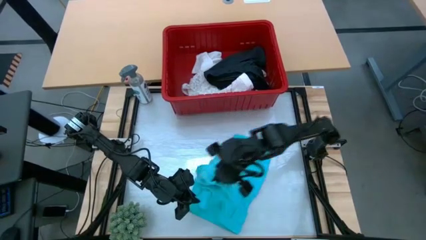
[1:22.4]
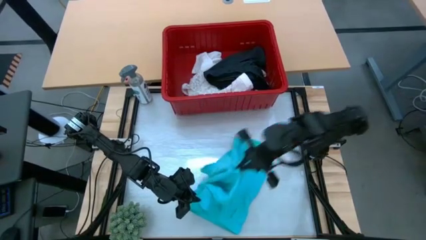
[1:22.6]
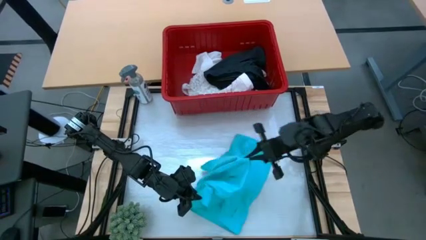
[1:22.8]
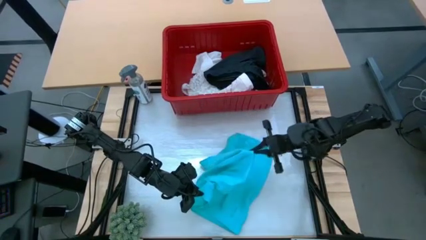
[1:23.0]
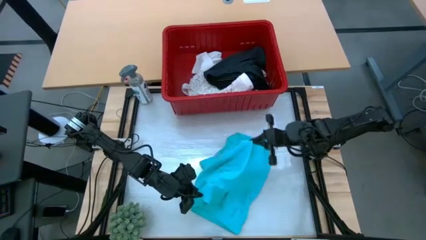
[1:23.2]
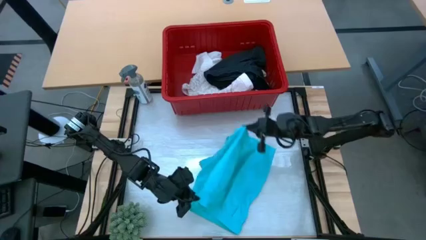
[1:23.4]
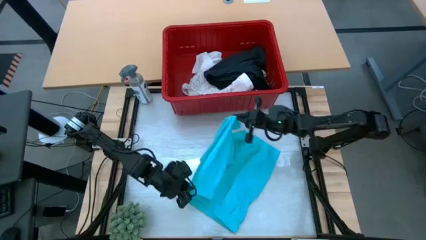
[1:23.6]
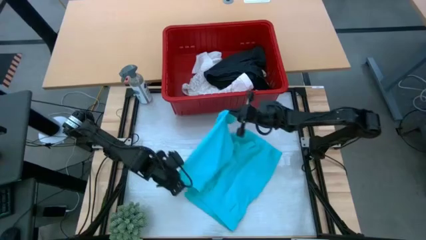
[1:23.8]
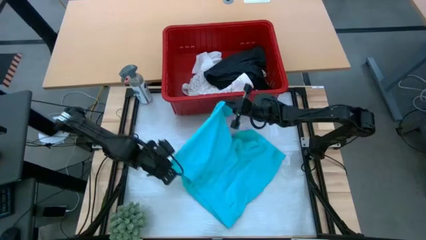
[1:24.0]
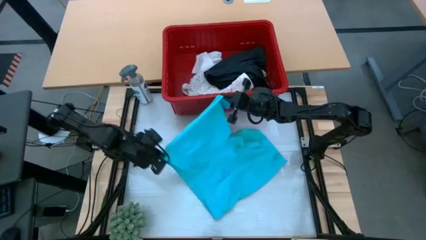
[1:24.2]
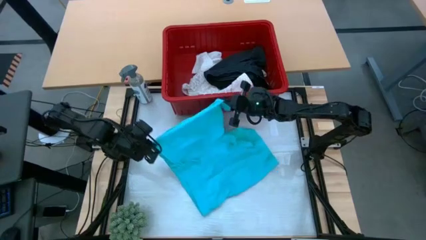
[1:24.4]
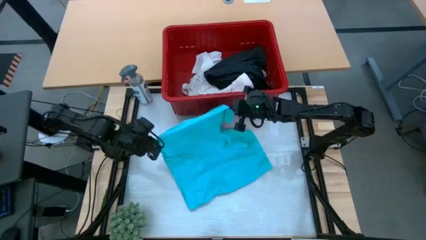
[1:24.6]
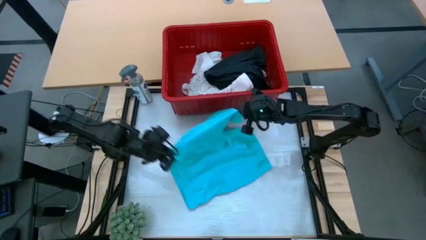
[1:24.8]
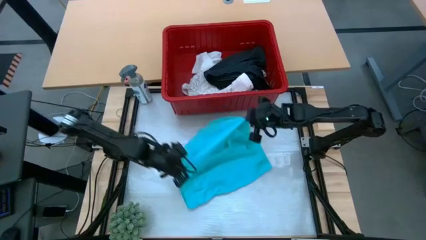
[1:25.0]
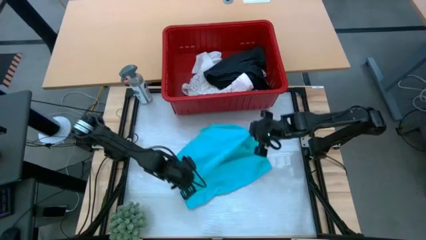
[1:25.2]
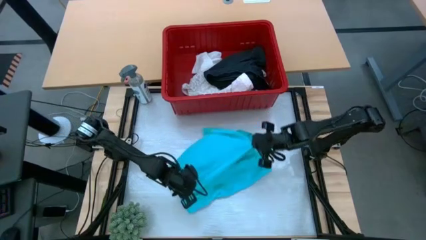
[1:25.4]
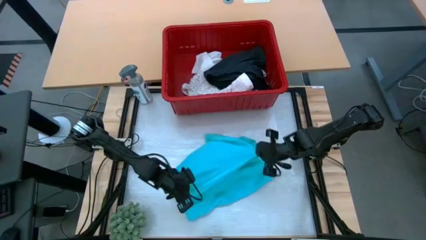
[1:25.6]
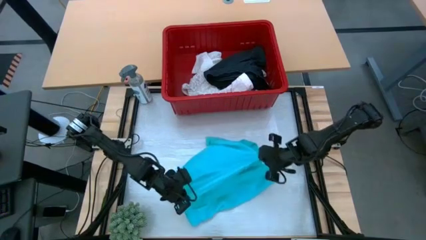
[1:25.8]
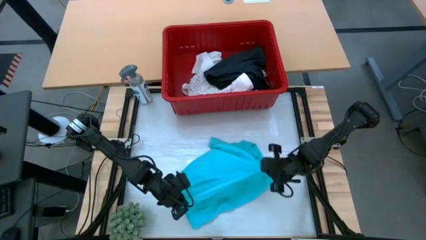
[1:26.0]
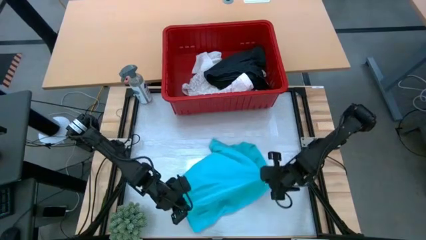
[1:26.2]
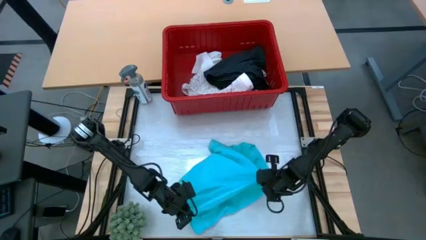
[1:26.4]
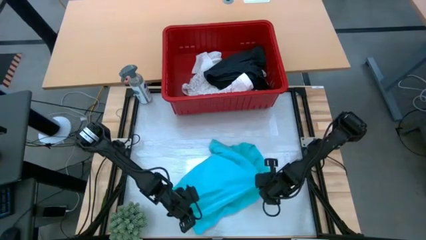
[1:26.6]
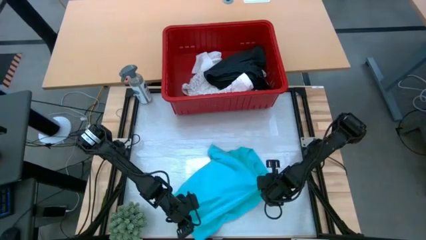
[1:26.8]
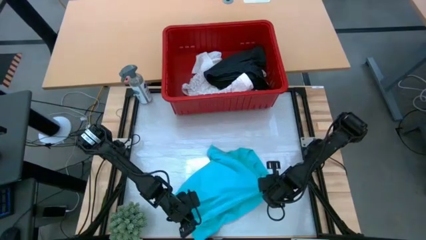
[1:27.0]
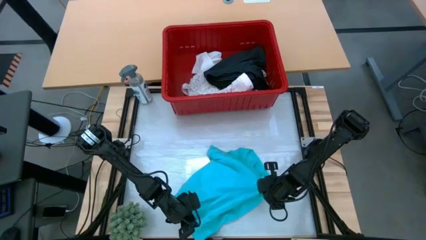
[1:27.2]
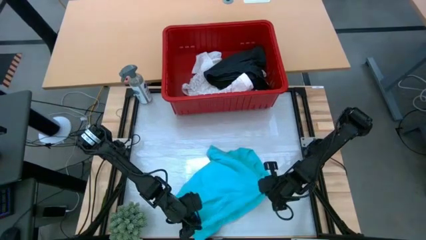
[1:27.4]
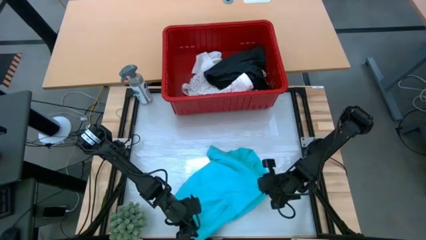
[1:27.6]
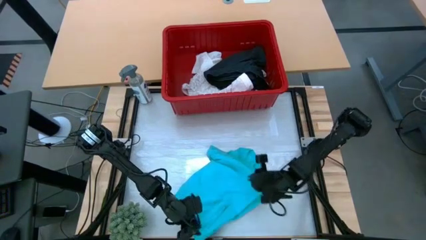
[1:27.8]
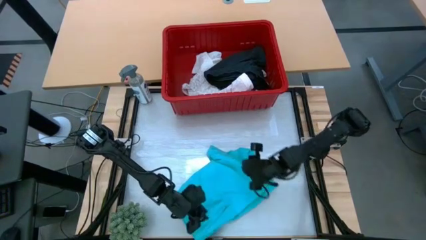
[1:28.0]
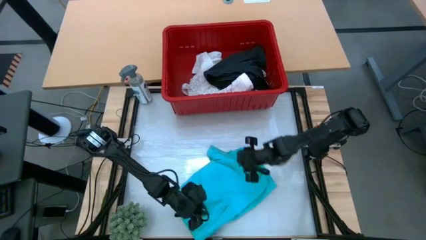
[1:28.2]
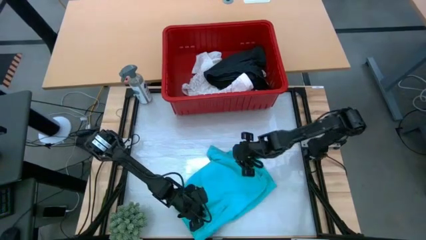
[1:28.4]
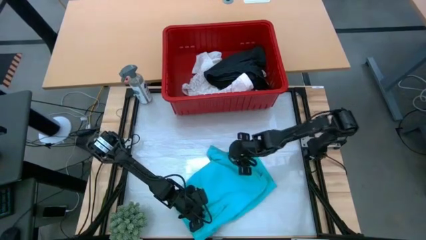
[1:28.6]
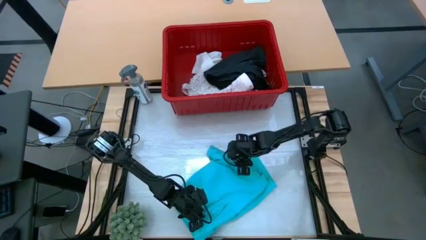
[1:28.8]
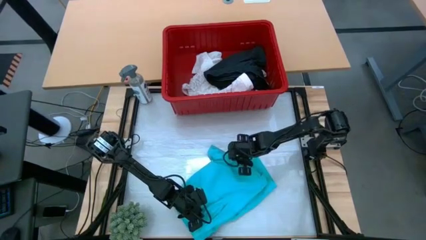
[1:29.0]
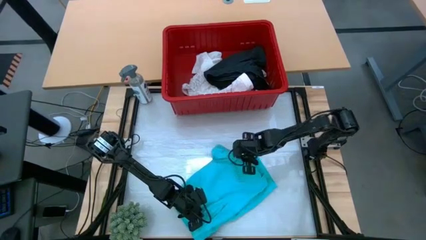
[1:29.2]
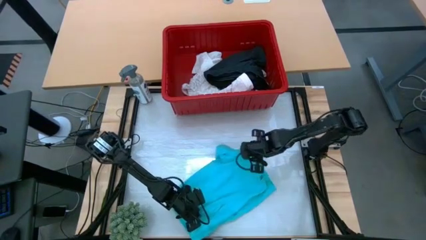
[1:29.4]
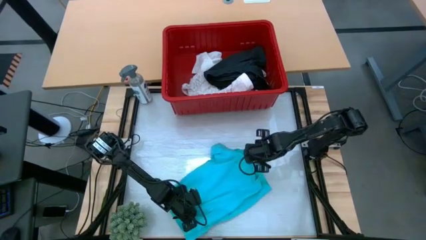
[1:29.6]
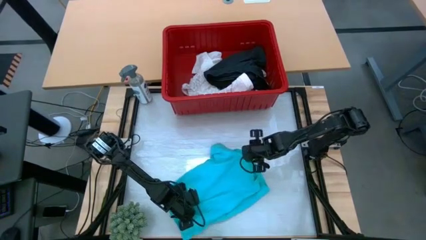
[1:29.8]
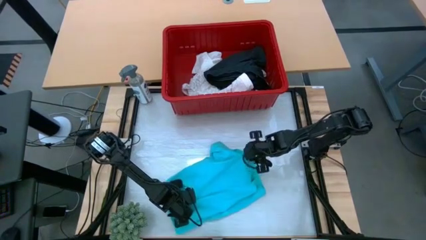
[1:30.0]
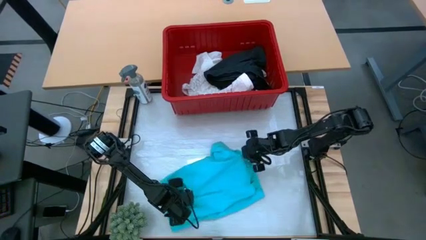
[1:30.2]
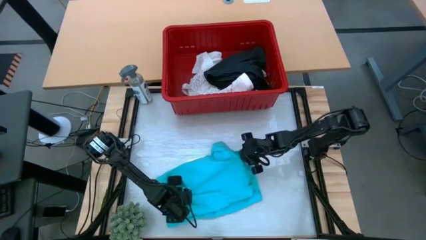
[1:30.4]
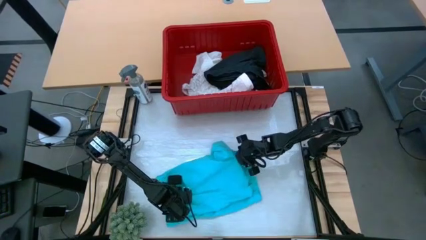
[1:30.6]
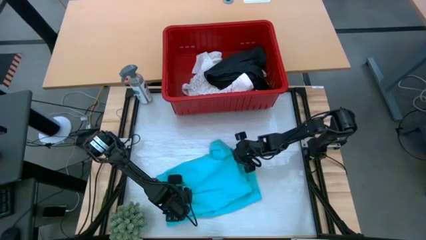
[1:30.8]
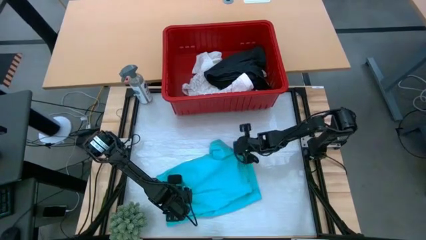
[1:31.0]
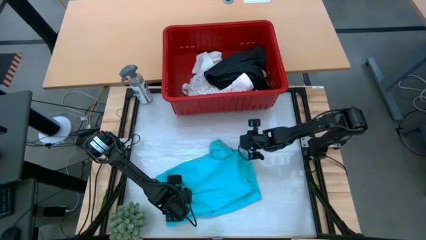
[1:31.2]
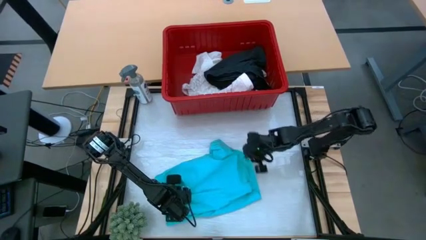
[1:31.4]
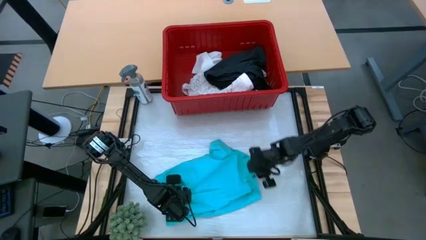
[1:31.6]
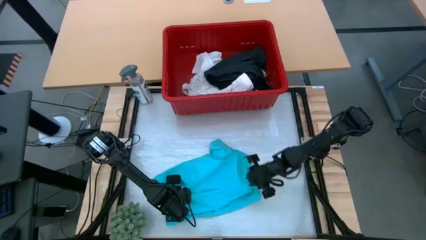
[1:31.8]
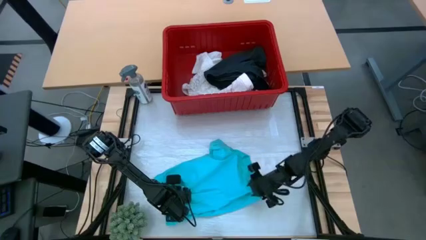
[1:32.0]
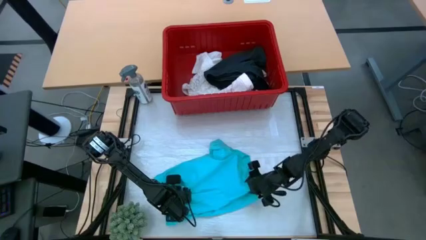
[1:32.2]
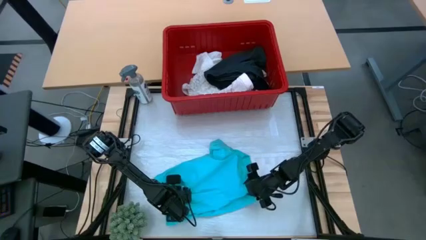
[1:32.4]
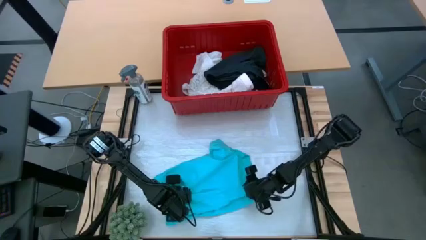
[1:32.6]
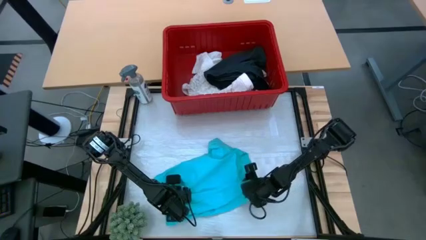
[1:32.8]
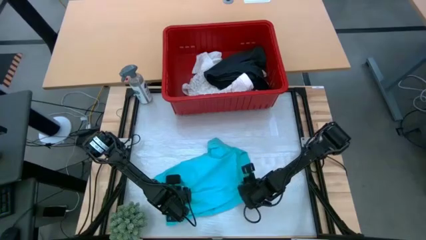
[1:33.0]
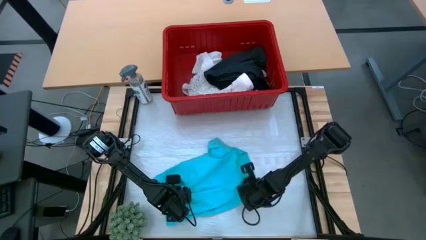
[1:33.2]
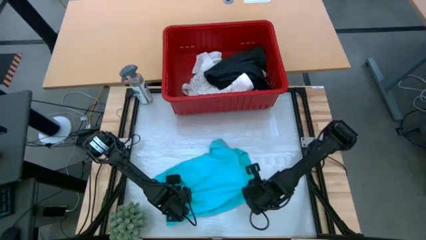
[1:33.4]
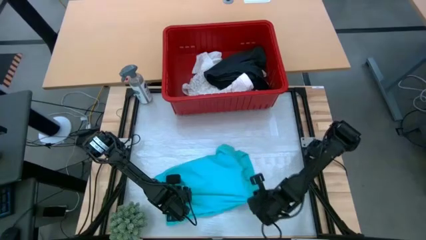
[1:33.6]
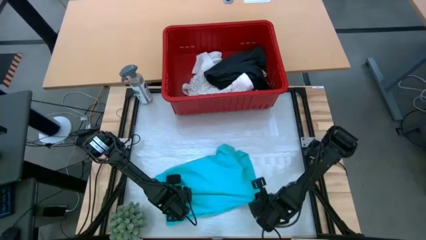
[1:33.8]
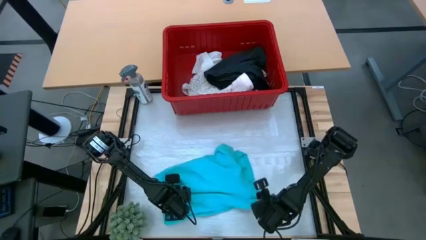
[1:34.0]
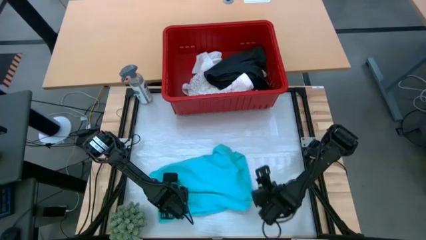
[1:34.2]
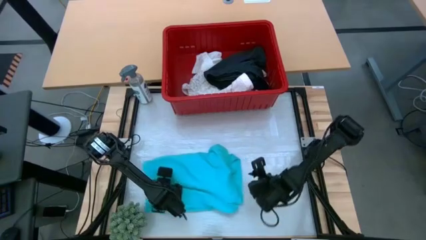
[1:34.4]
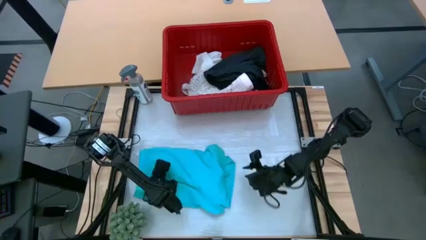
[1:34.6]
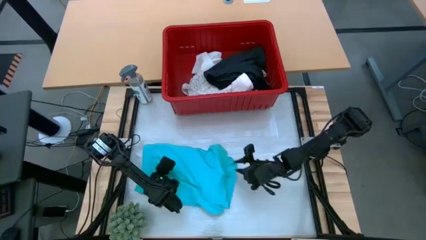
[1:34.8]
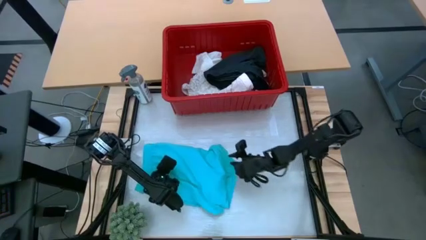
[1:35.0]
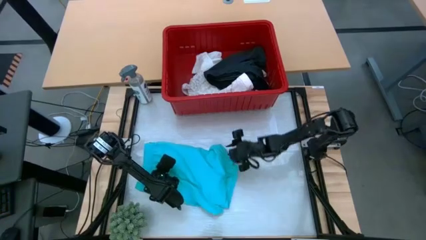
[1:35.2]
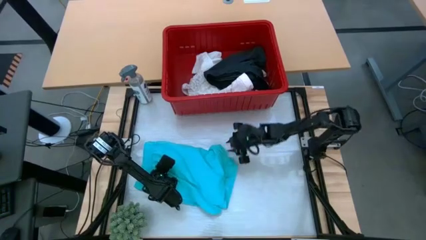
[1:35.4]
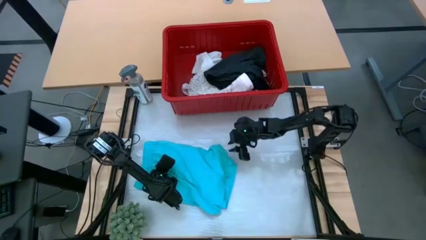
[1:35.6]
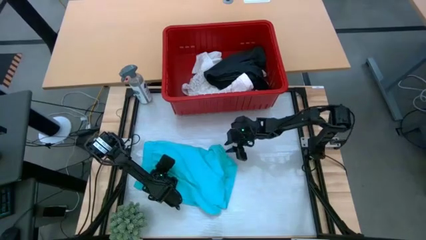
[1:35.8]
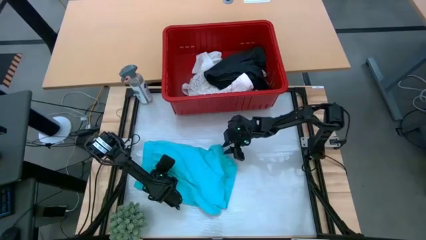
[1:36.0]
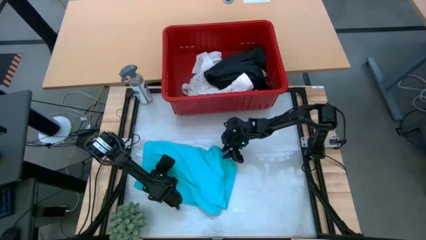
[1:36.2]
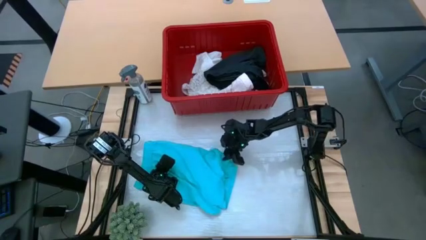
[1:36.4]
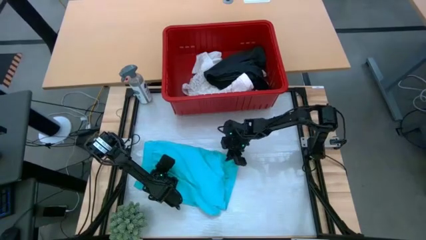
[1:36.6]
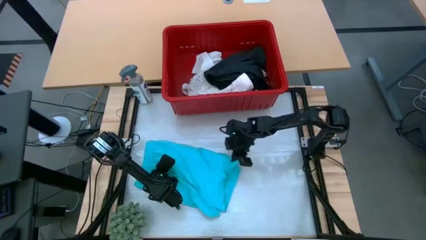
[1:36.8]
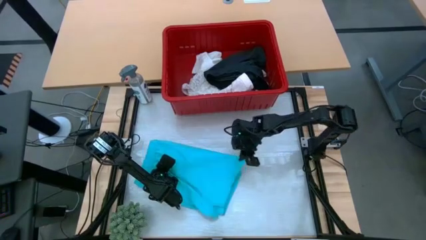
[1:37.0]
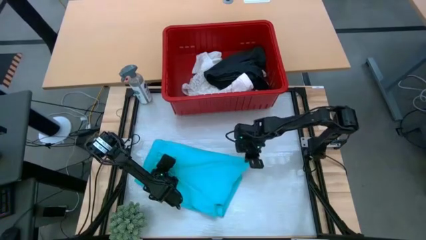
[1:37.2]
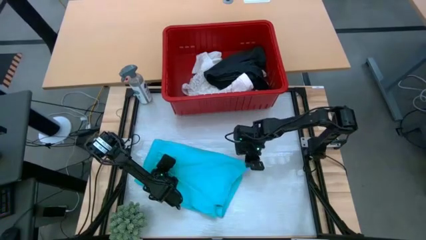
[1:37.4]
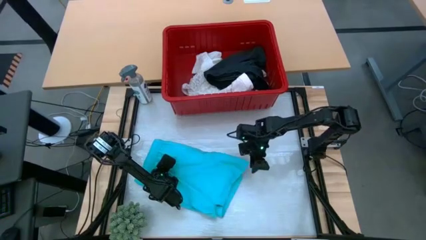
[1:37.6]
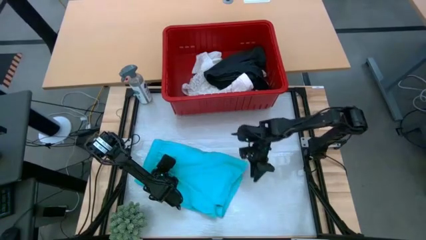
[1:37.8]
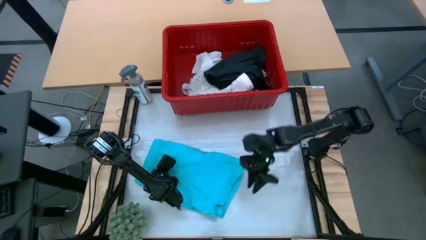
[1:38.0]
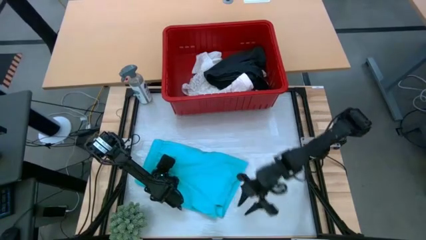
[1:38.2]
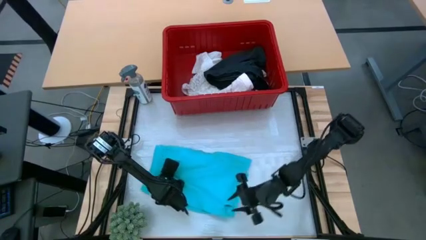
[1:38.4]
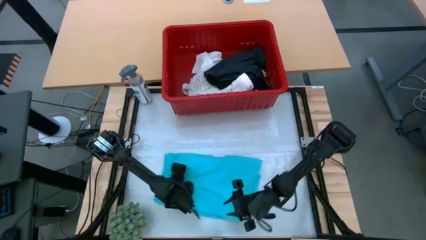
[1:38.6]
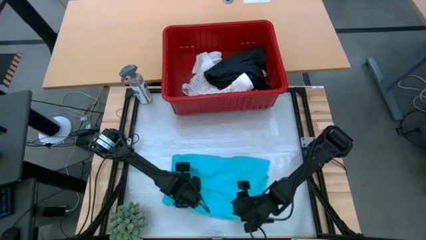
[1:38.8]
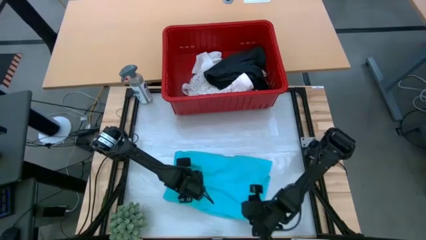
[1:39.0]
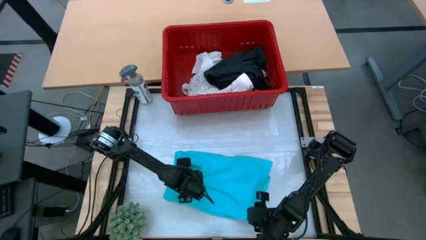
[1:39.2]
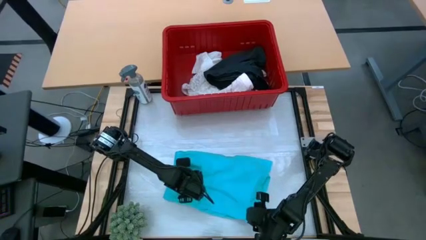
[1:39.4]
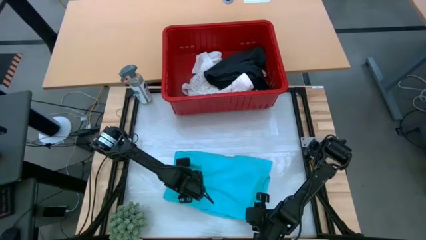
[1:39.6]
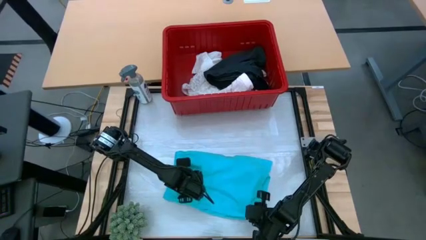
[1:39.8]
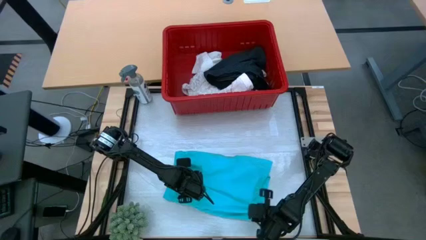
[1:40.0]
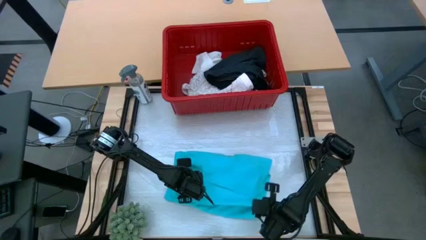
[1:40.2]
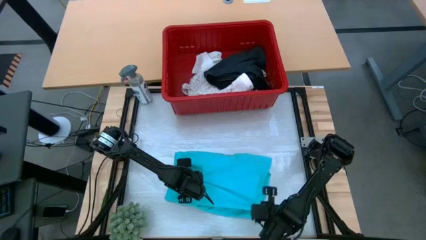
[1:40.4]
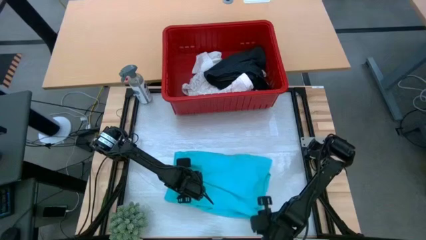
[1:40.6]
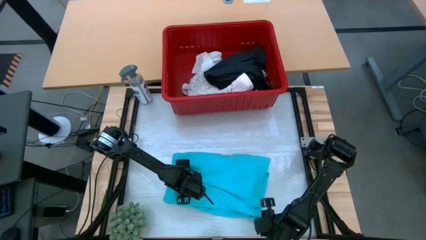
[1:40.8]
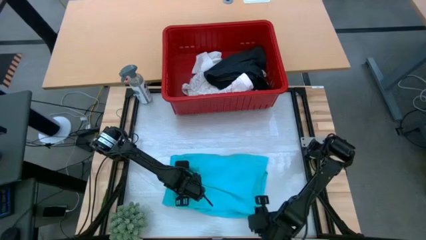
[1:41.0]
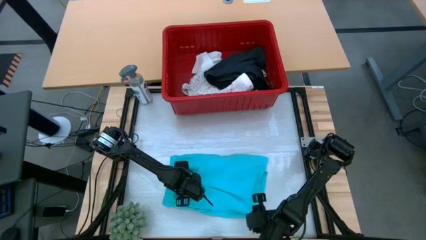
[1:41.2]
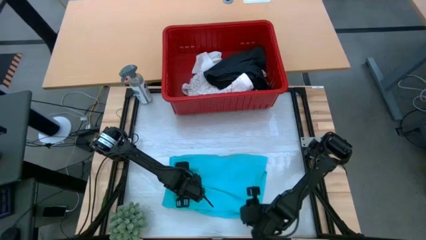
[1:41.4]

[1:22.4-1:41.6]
Task: Fold laundry
Fold the light blue shorts
